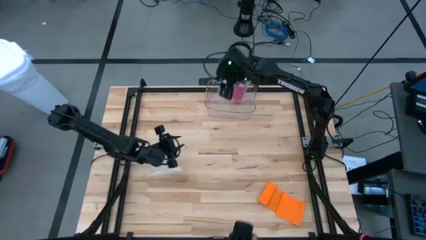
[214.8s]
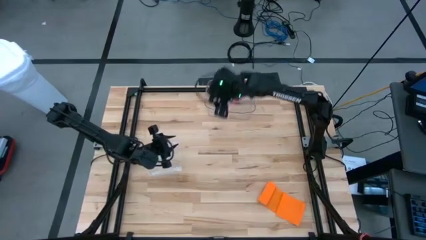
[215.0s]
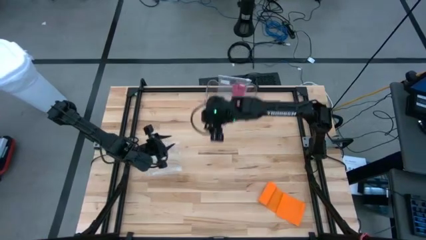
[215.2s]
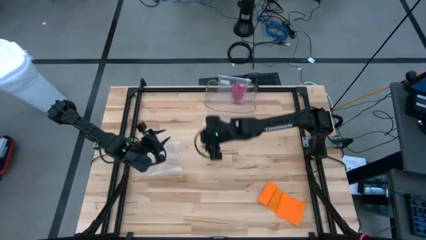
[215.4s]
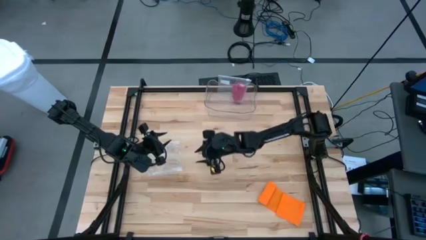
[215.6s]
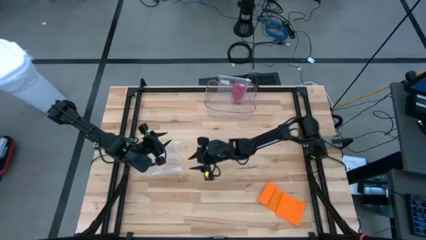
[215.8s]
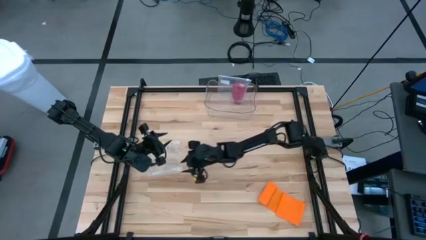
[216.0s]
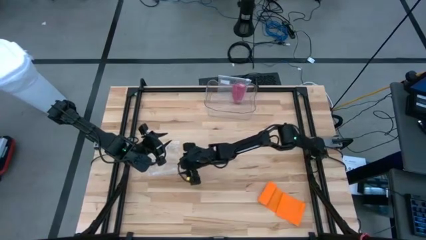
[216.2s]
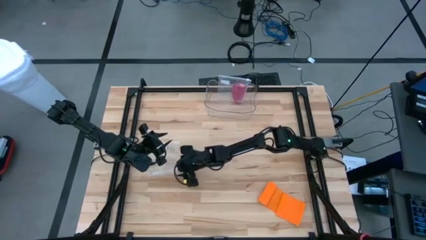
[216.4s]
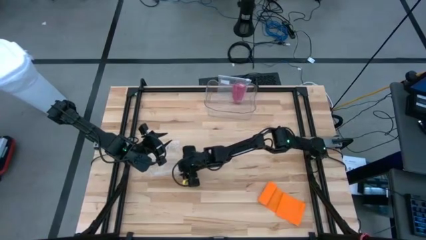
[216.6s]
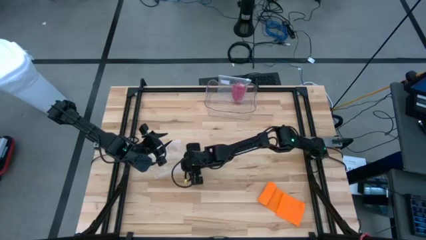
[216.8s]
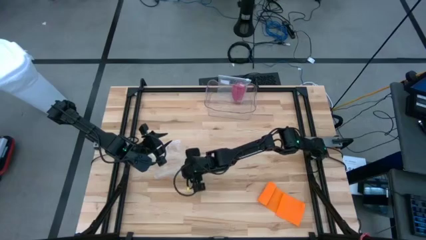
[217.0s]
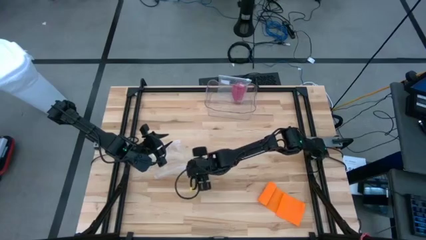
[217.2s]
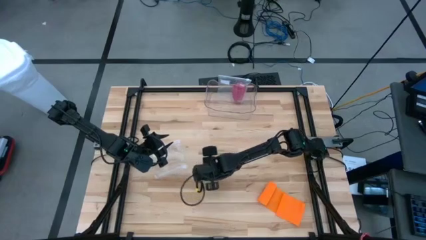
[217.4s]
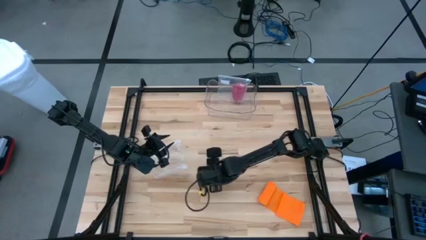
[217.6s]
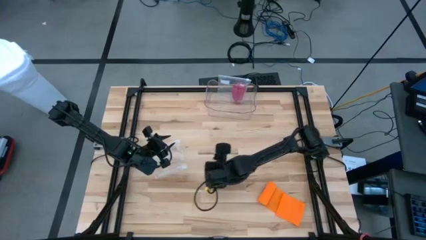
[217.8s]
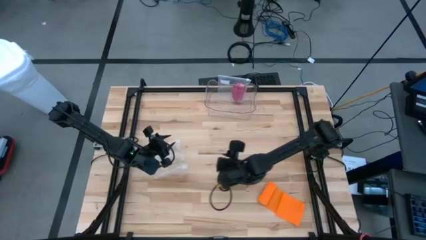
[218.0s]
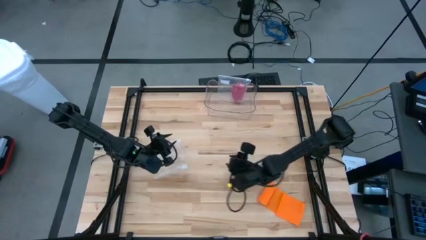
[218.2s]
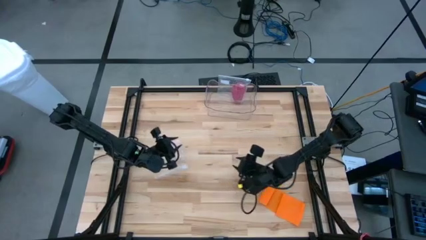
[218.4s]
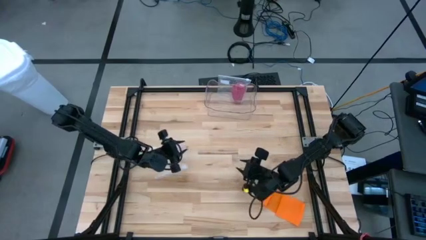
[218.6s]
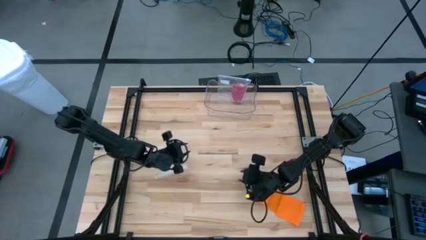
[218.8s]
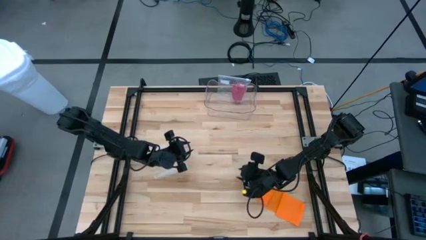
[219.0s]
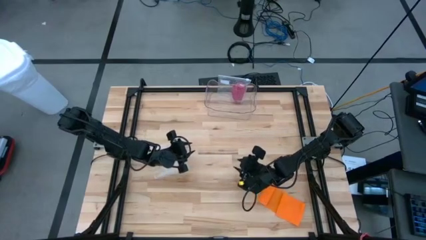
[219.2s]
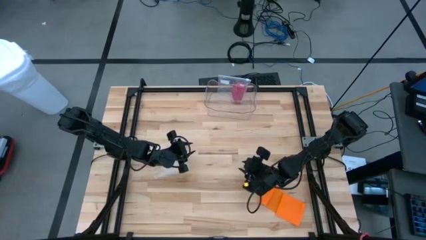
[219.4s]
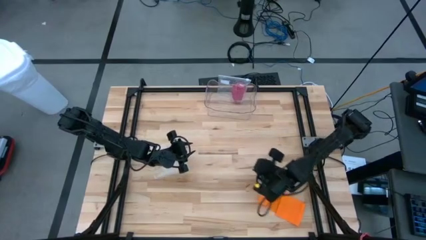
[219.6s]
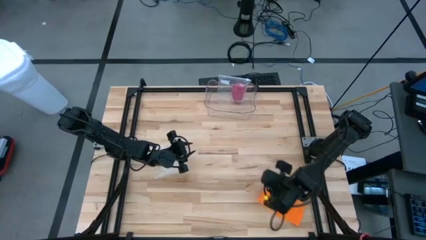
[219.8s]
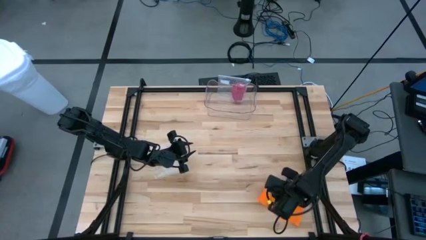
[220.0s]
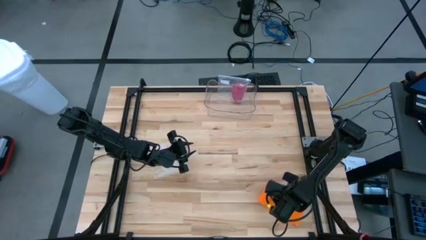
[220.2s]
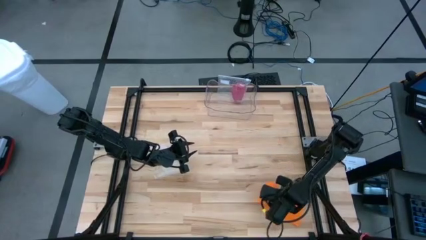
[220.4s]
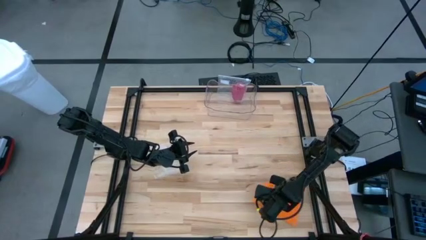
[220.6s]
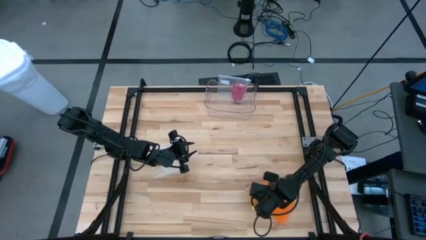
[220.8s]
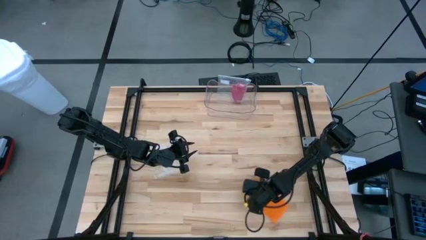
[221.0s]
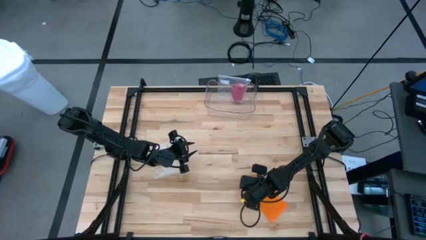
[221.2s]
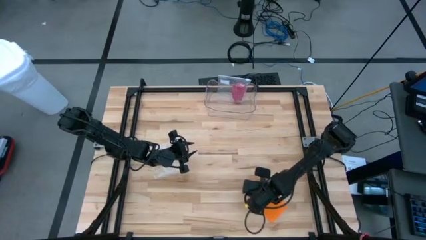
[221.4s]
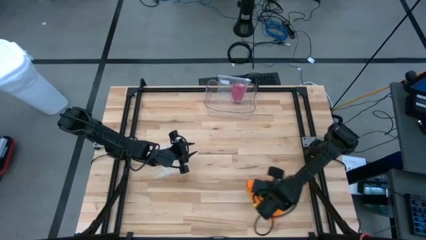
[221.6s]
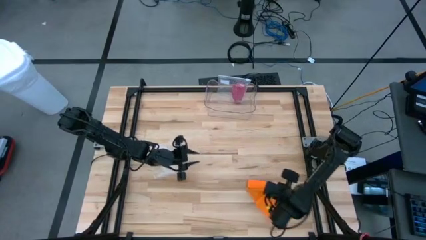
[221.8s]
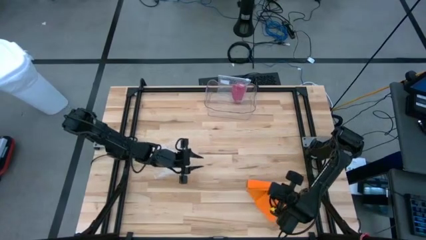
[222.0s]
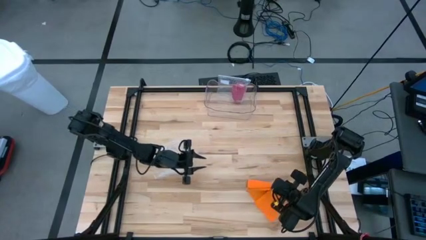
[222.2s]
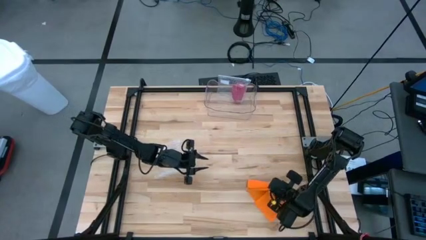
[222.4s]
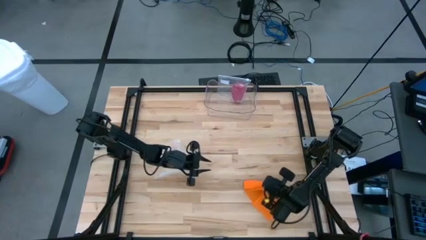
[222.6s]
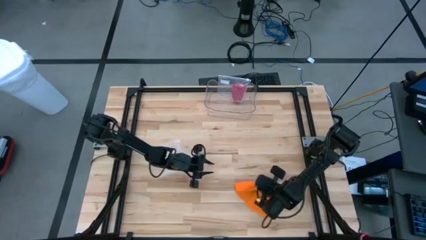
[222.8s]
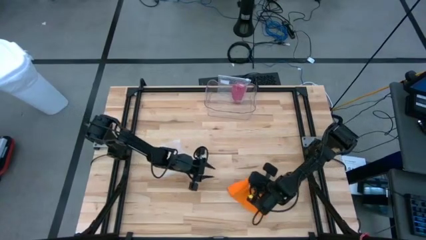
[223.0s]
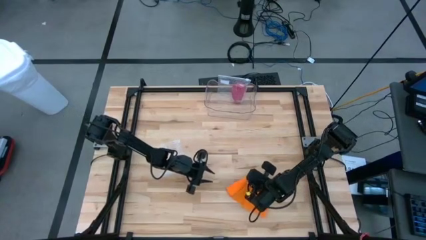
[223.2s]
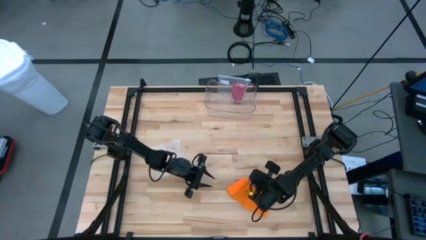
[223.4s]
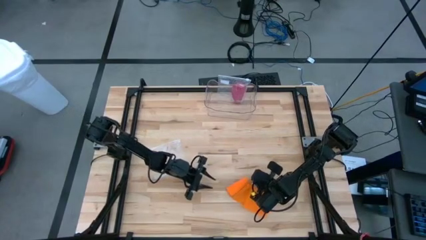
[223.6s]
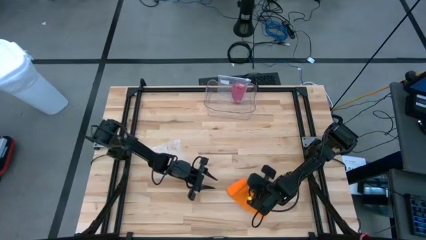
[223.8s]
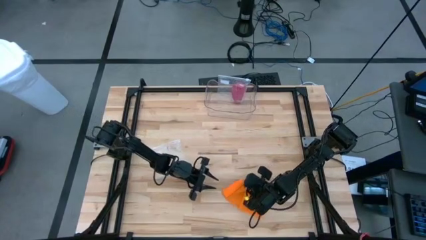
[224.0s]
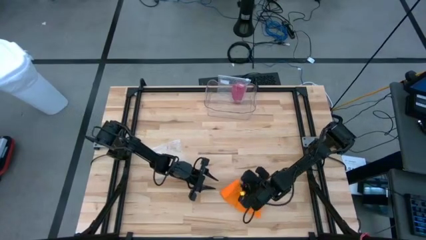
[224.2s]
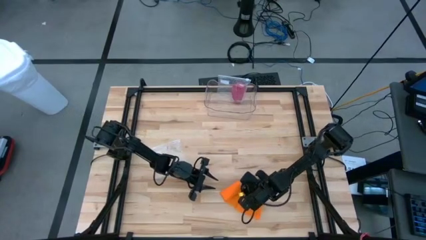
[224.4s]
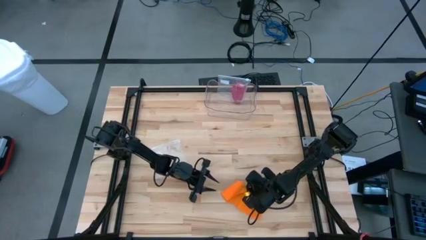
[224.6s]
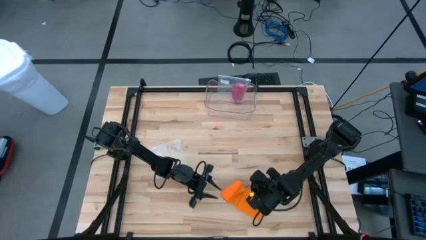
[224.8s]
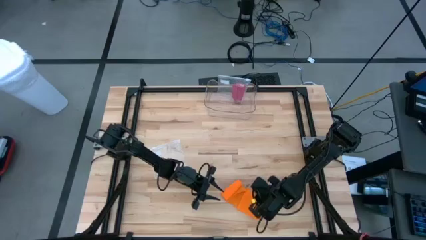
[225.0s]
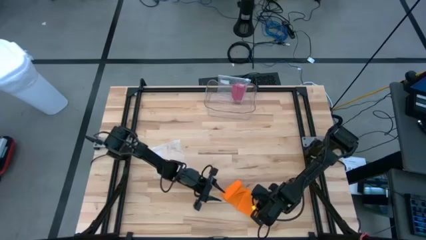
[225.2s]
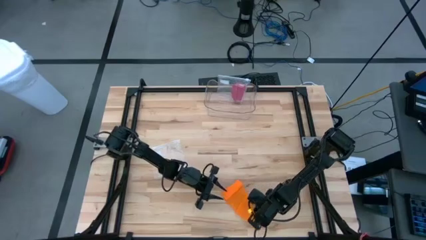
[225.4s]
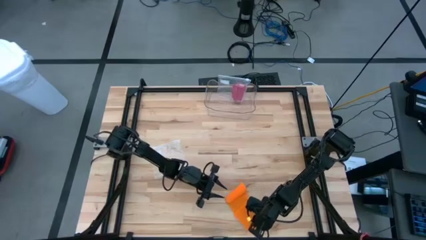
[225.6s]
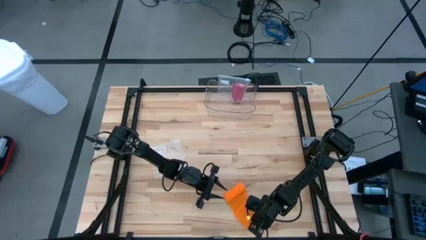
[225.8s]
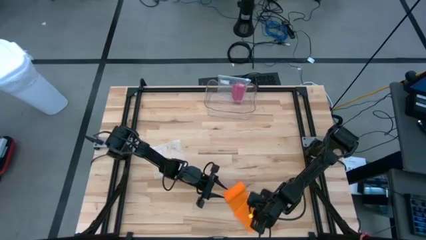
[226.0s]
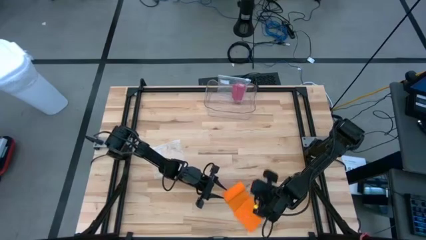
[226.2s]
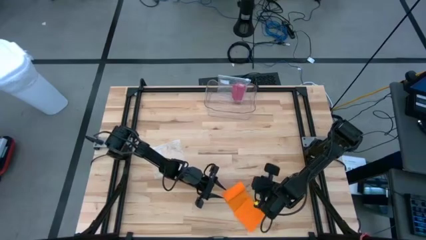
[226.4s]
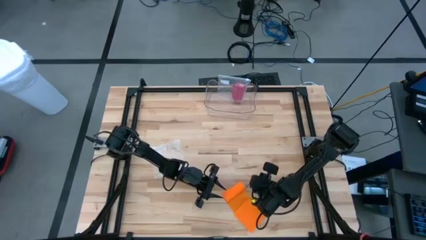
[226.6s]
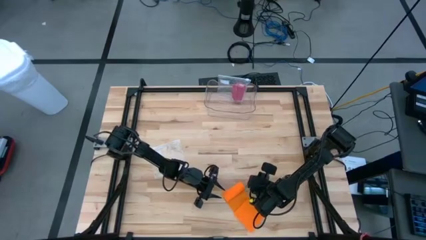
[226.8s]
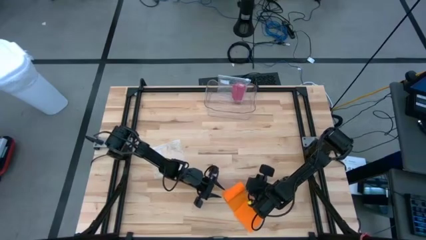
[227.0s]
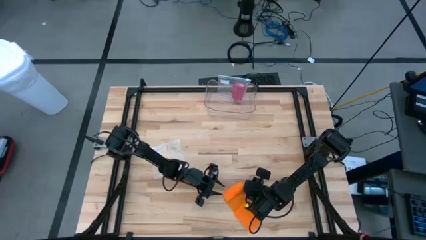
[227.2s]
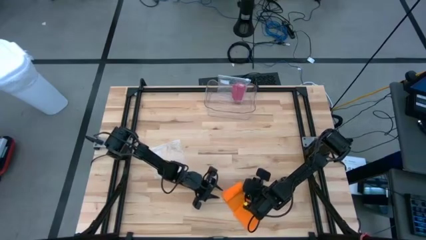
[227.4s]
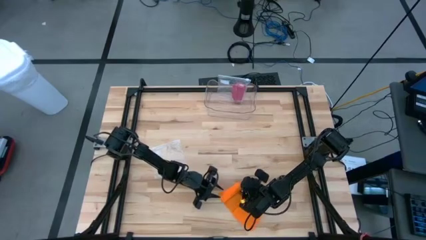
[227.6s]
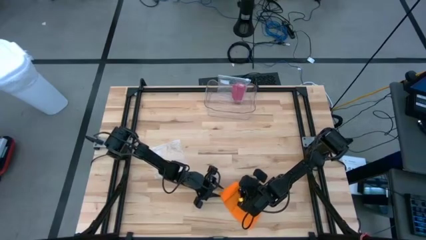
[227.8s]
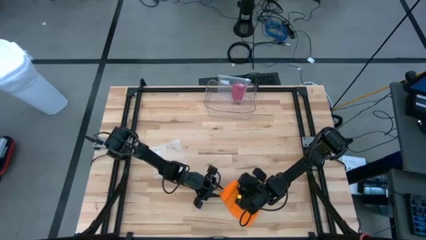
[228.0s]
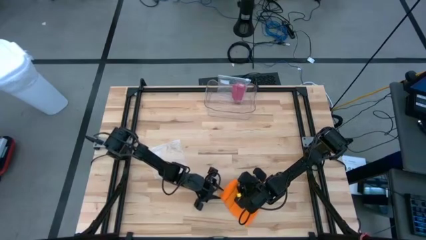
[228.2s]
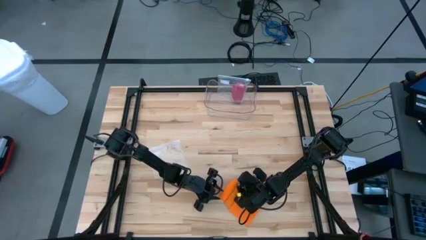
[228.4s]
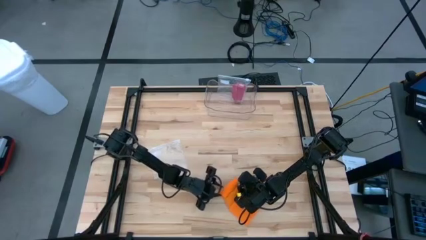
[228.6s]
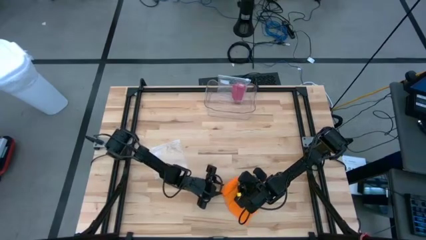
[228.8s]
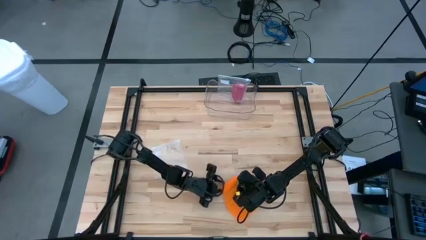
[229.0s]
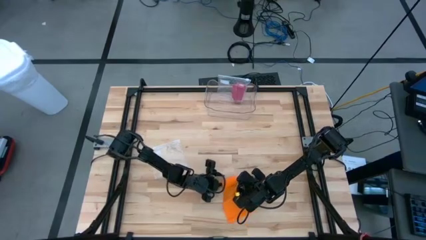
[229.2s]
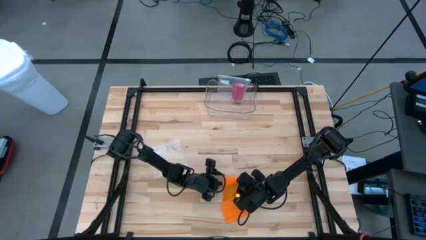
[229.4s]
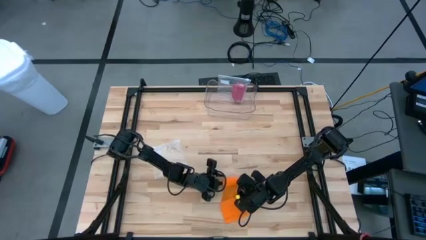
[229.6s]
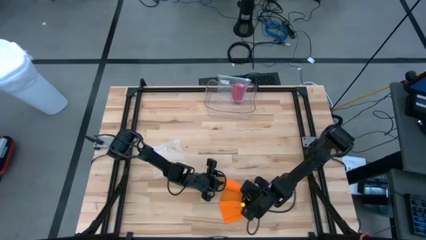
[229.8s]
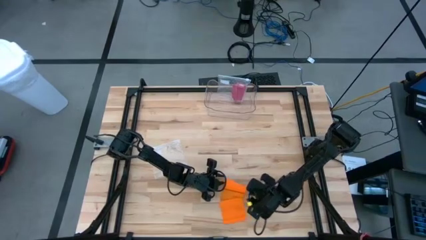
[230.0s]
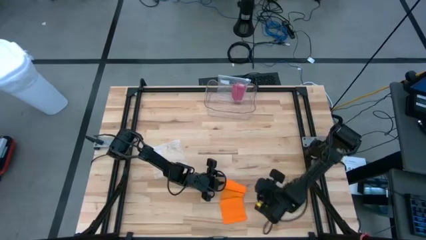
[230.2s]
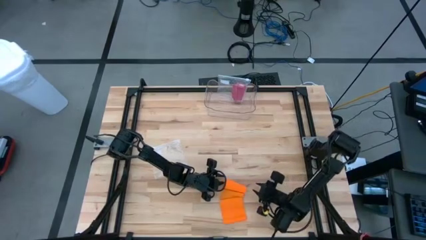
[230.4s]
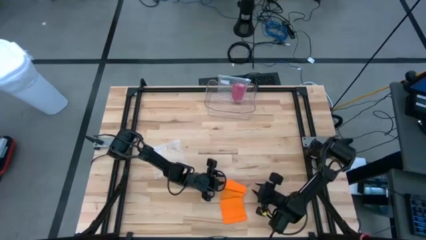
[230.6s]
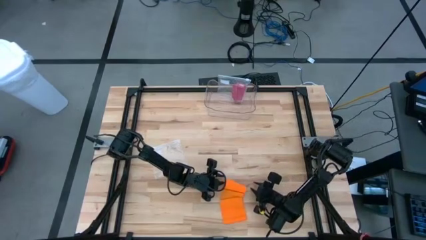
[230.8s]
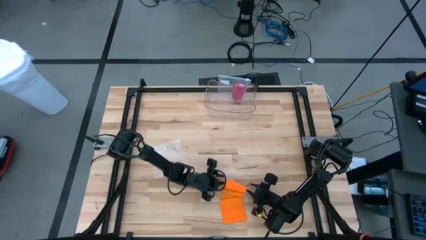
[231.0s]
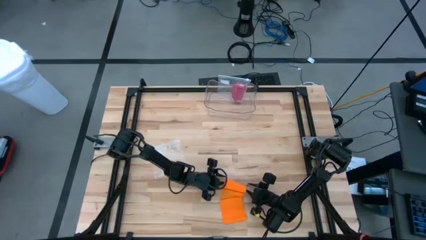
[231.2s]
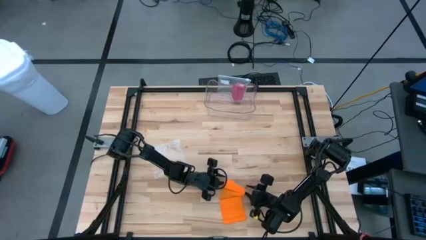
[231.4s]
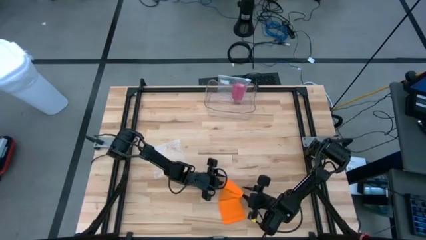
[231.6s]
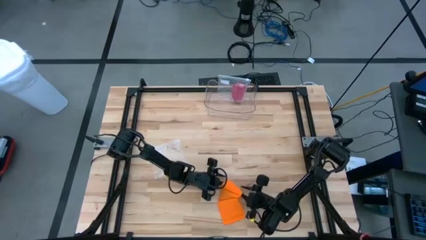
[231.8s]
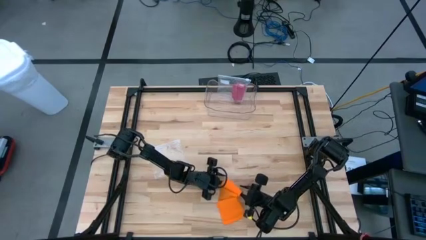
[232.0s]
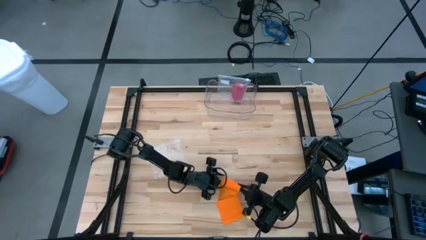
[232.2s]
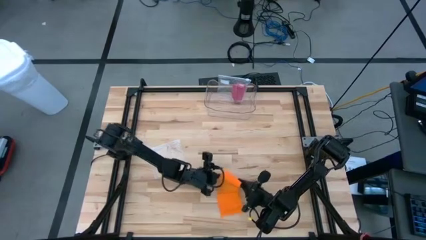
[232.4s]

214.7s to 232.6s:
Task: Roll bandage
Roll the orange bandage
